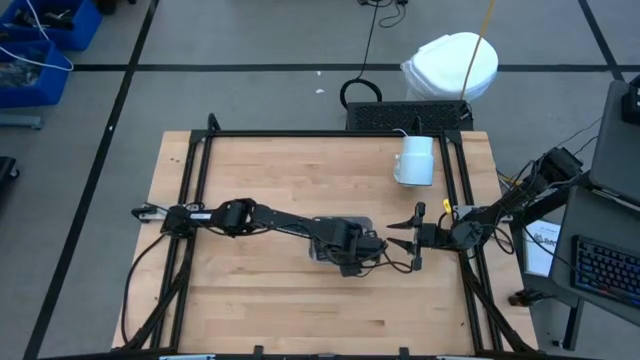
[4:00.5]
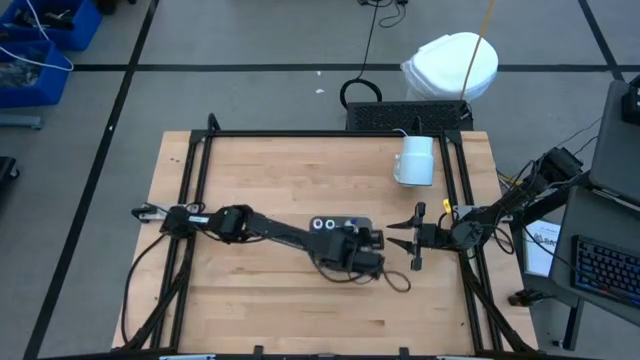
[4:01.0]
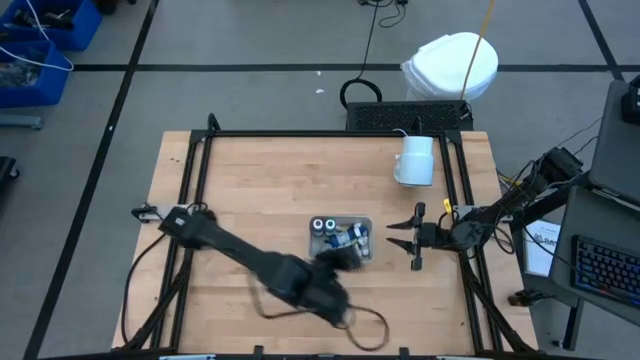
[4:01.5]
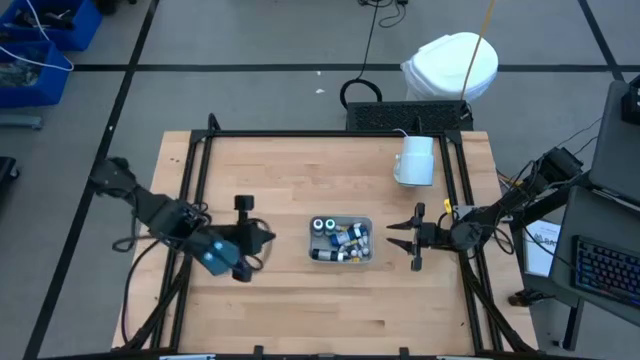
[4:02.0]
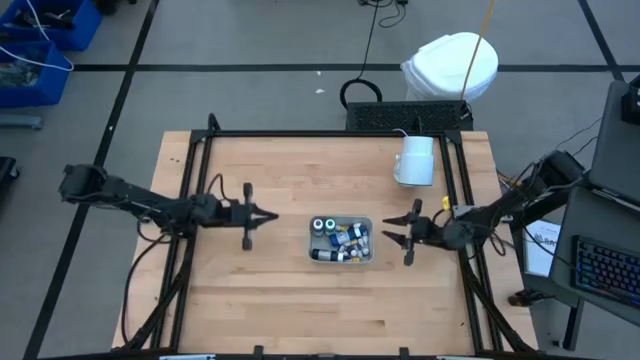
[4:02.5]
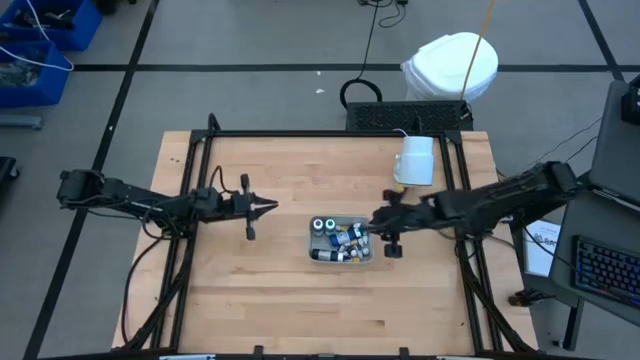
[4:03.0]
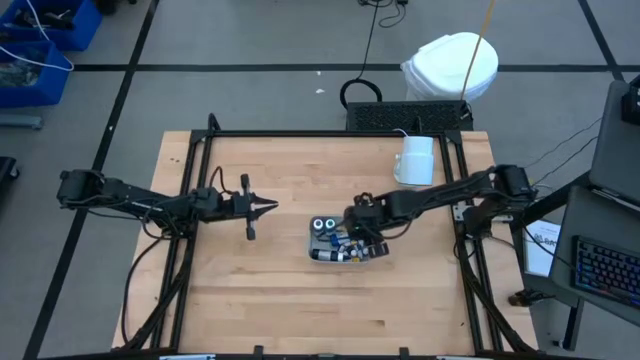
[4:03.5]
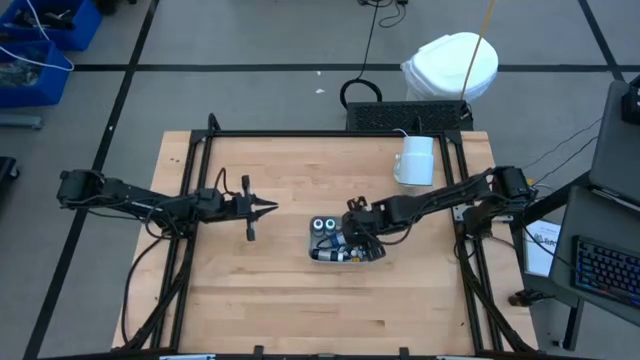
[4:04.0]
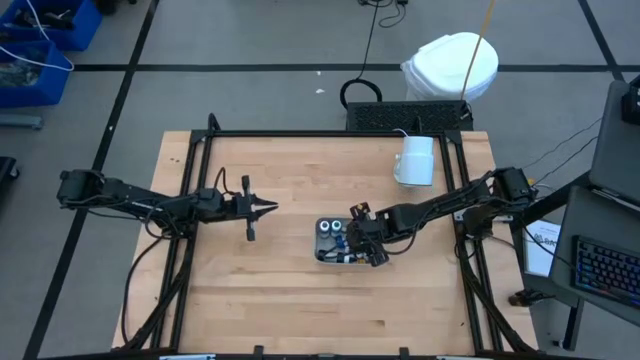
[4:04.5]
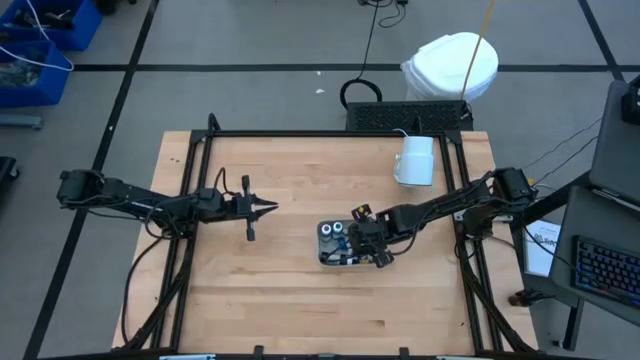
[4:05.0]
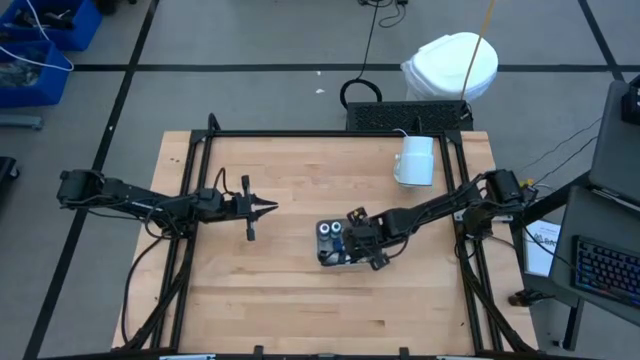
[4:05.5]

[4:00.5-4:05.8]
Task: Pick & Place food coloring
Adjust the big blue food coloring in the gray bin

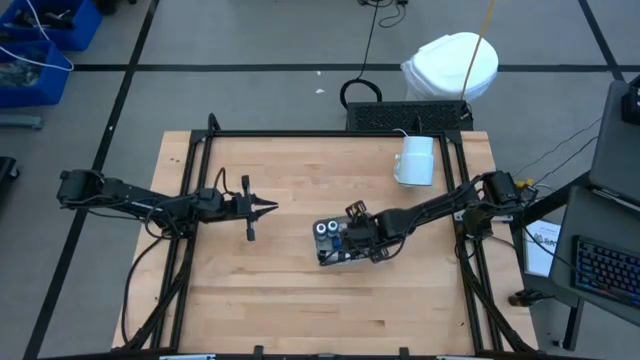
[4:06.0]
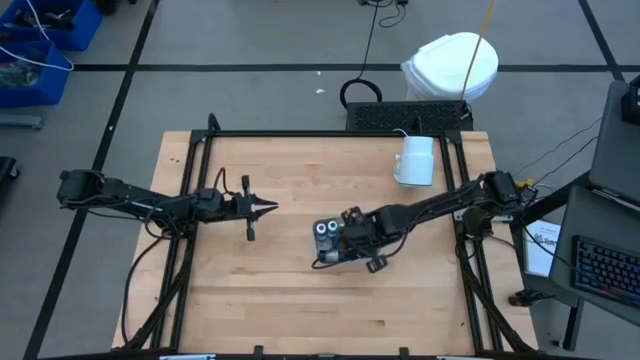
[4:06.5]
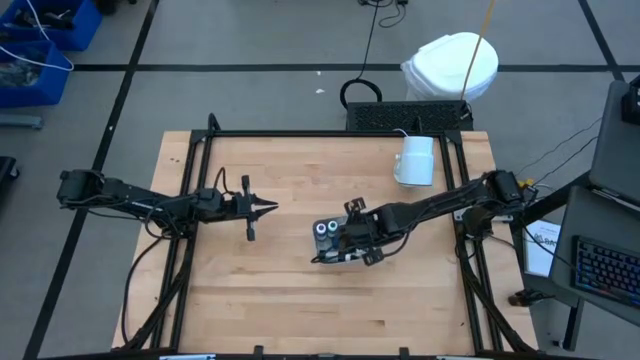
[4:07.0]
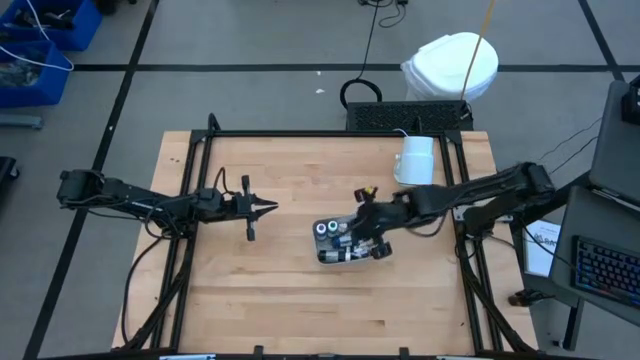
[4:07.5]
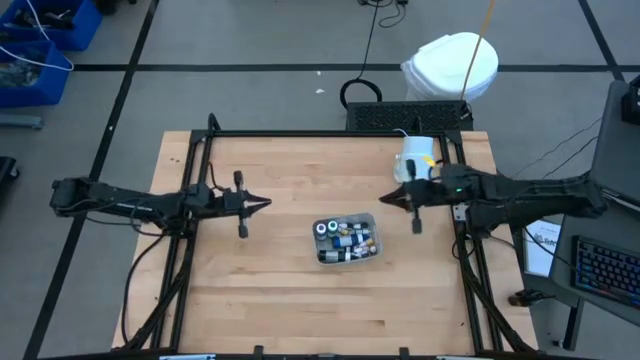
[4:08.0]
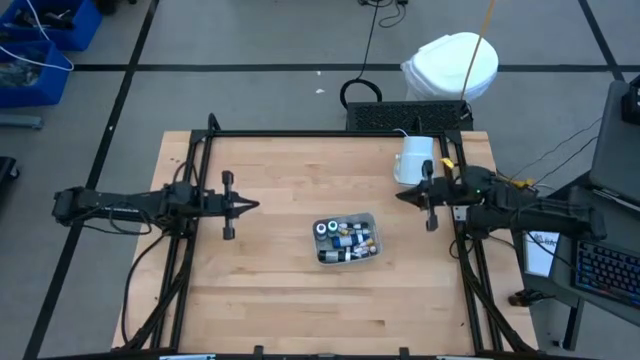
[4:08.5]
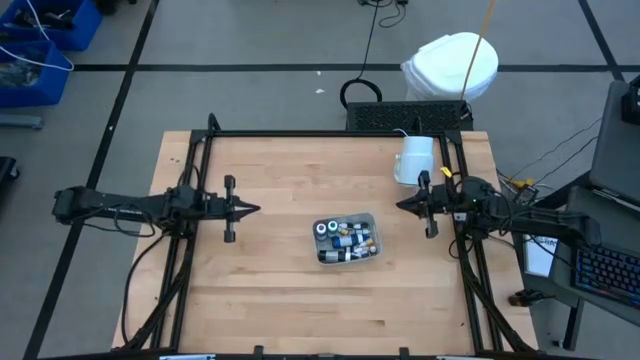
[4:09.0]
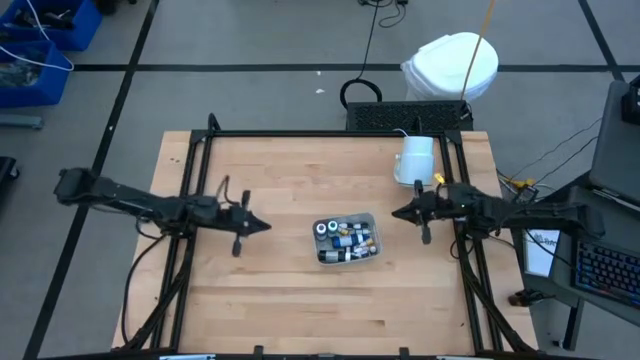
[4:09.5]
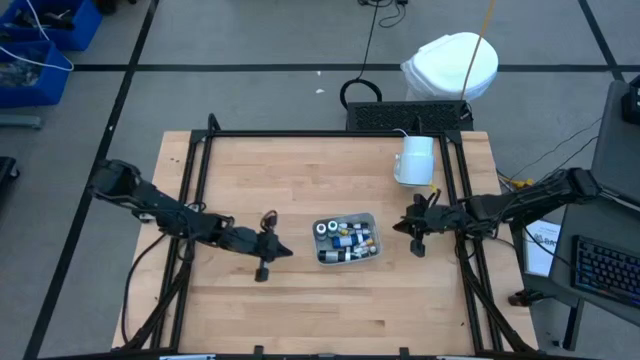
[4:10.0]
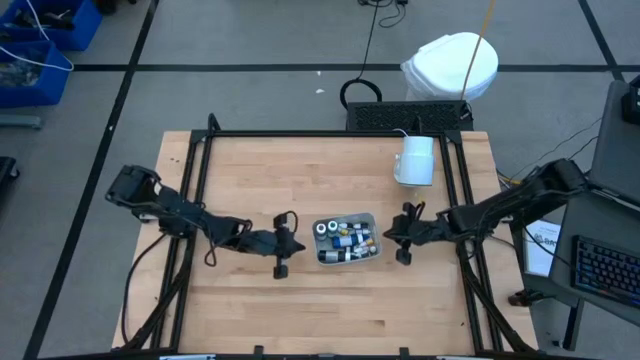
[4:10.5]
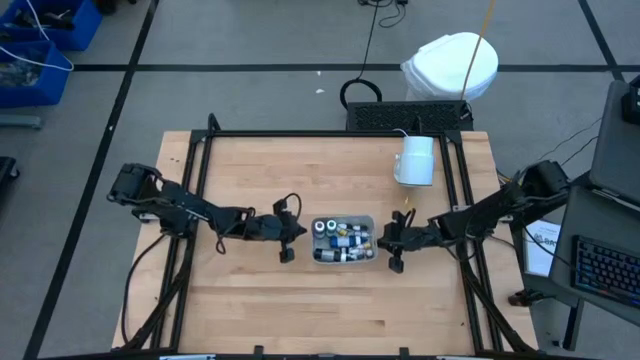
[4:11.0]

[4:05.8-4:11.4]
Adjust the gray bin

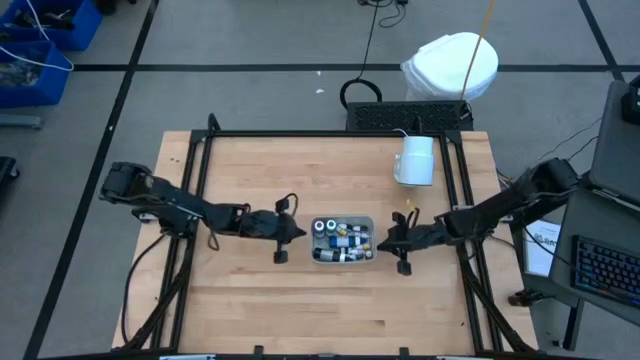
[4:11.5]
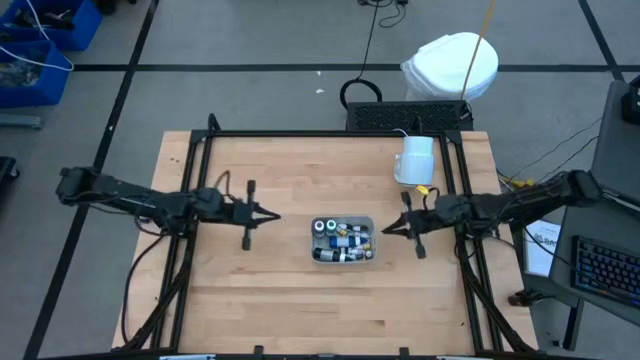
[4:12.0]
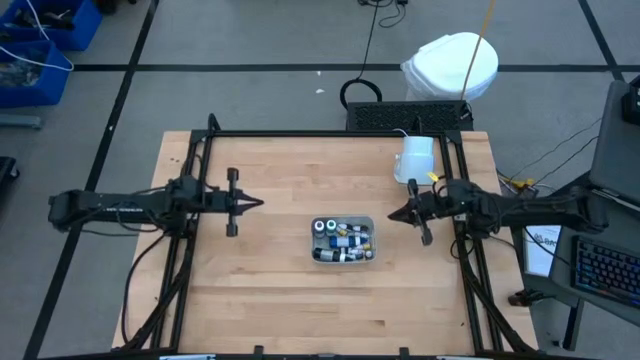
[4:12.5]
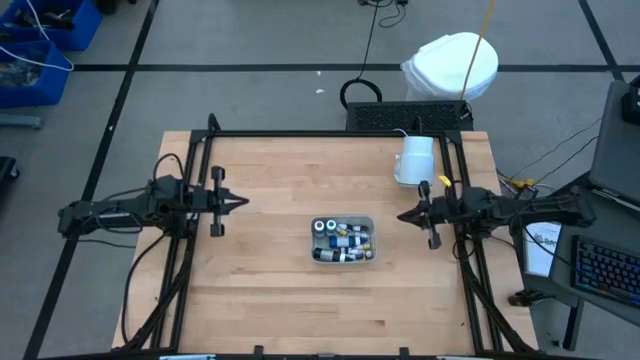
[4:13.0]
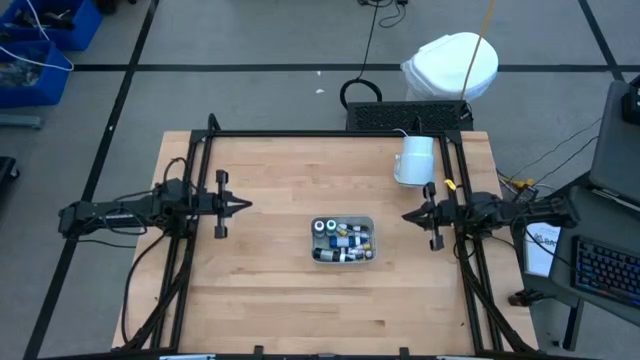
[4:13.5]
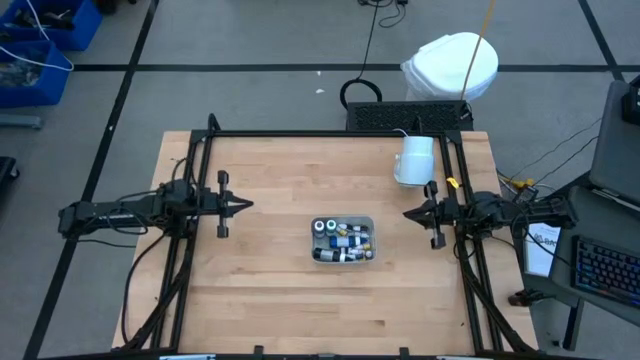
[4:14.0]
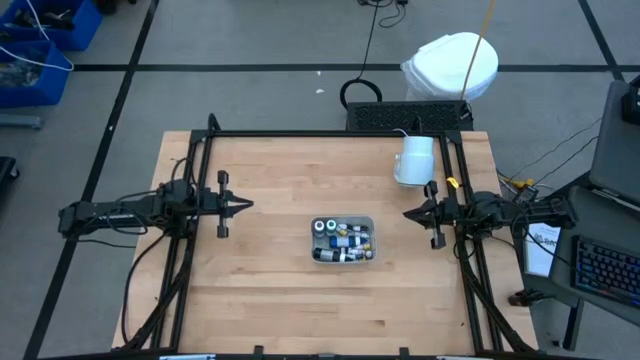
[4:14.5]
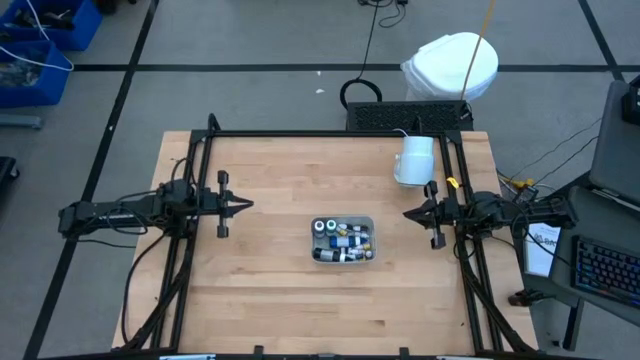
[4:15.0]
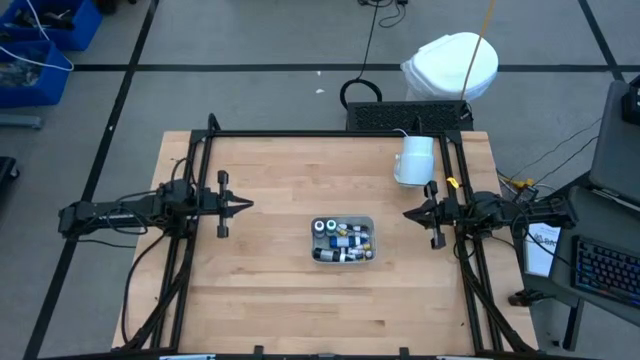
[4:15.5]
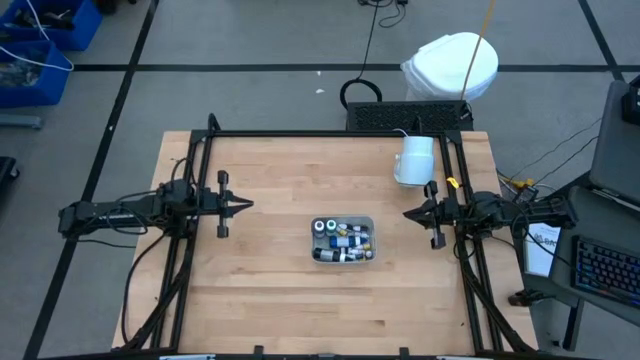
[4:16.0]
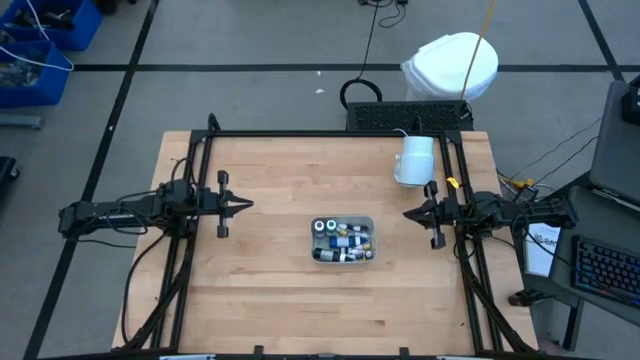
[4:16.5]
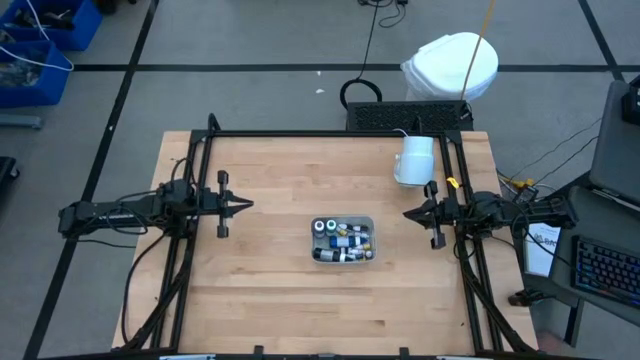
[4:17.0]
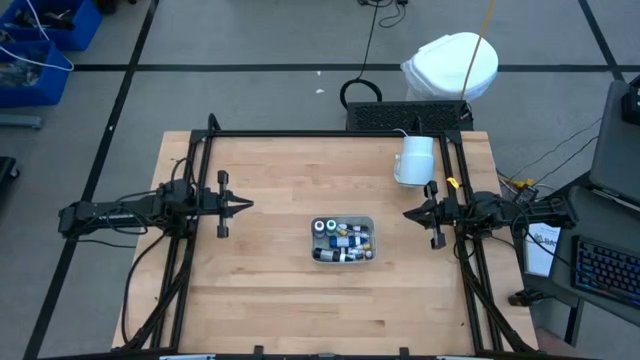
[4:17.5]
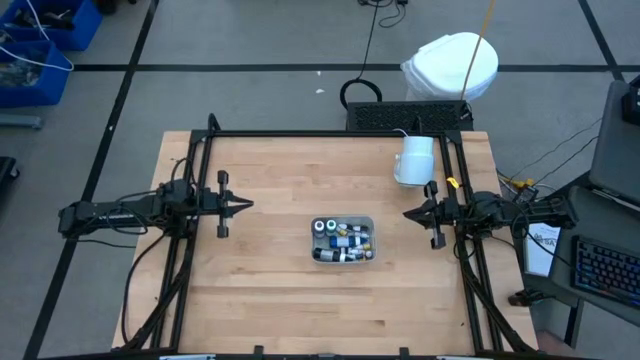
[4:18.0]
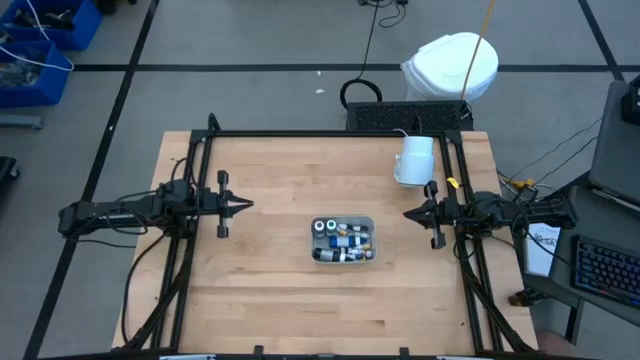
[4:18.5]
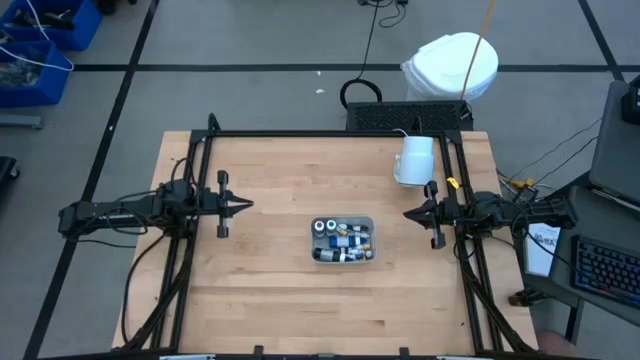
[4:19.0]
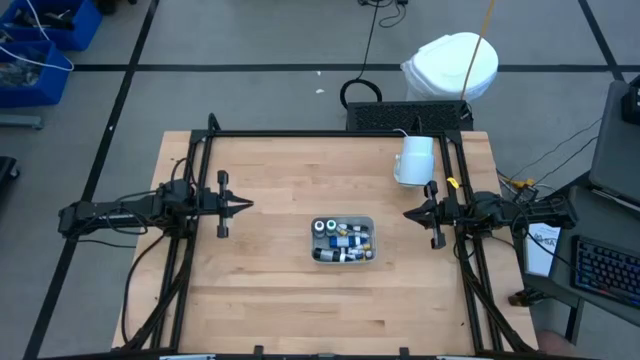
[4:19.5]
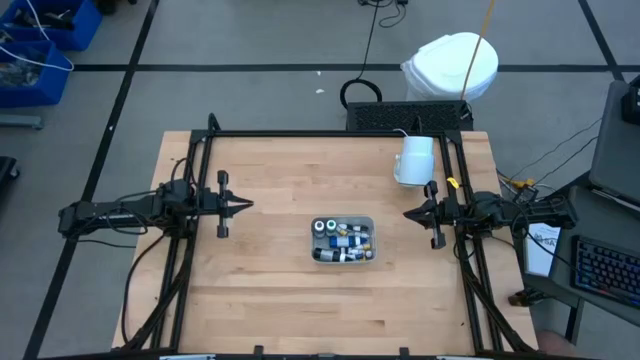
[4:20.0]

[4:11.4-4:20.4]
Return to Home Position

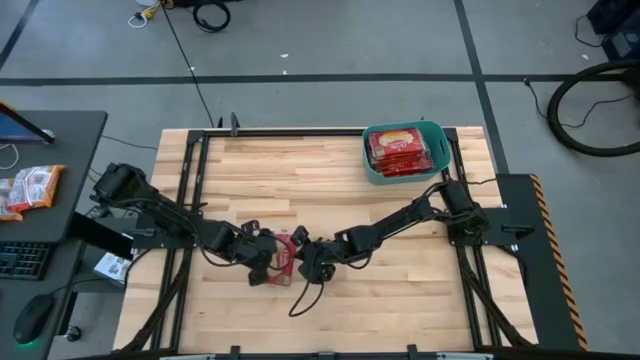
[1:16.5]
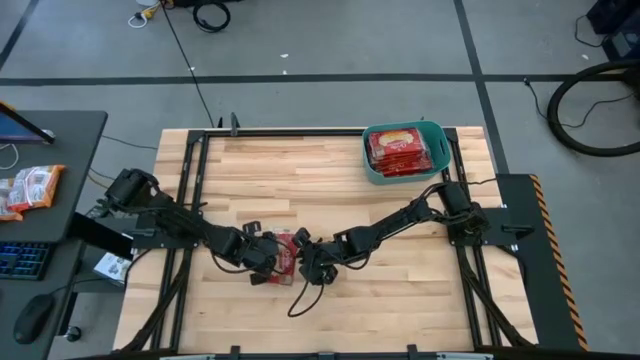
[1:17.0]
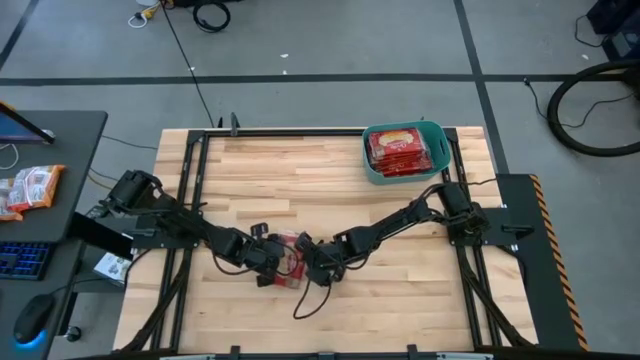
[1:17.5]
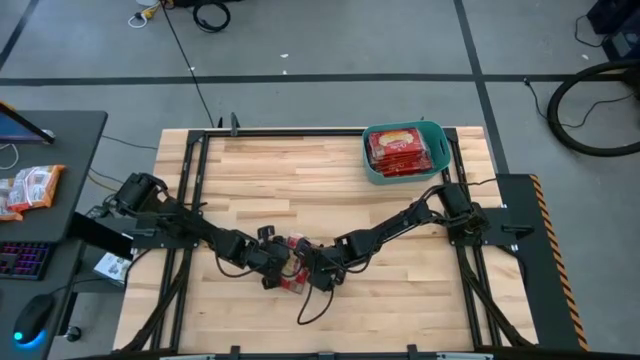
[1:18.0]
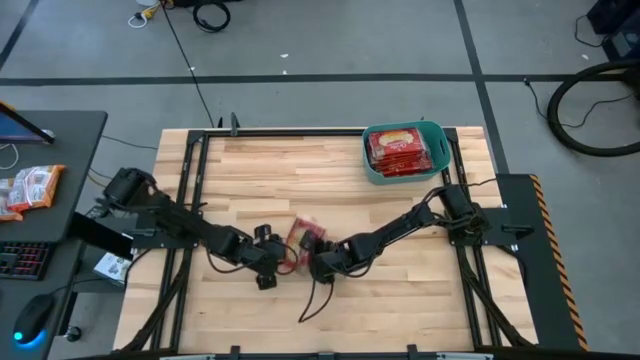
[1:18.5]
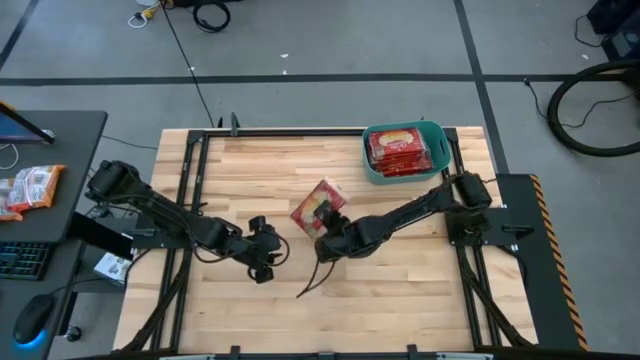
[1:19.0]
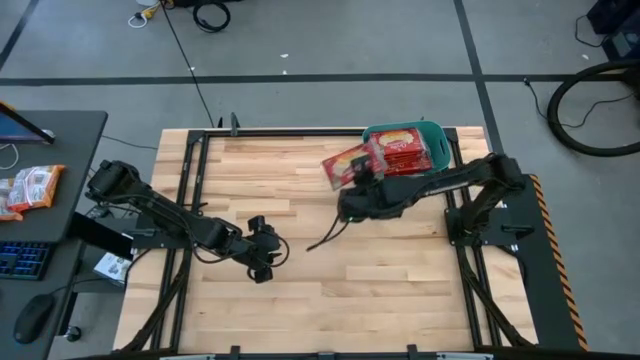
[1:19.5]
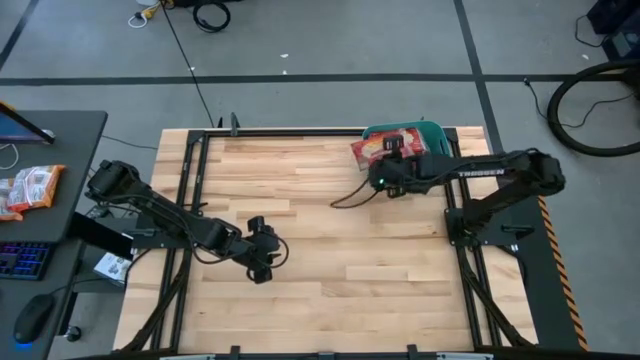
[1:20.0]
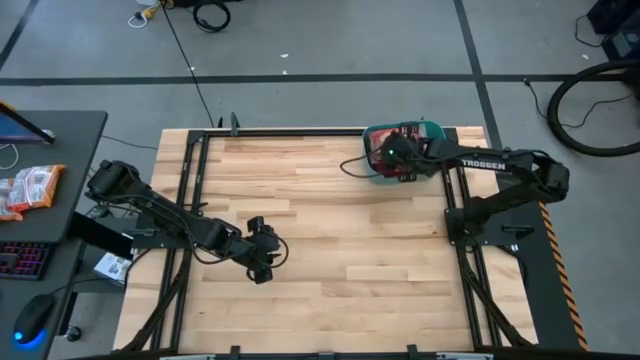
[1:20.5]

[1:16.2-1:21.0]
Task: Sort popcorn bags into baskets
Put the red popcorn bag into the green bin
